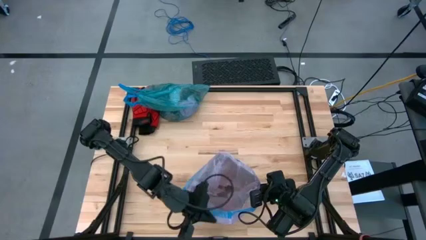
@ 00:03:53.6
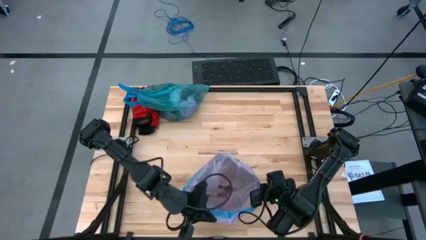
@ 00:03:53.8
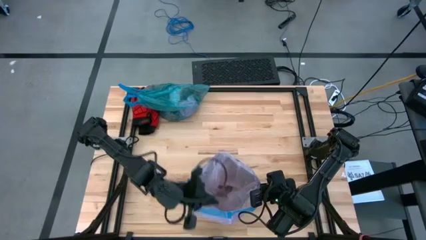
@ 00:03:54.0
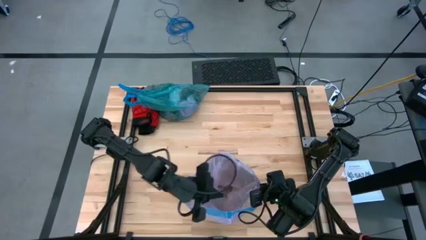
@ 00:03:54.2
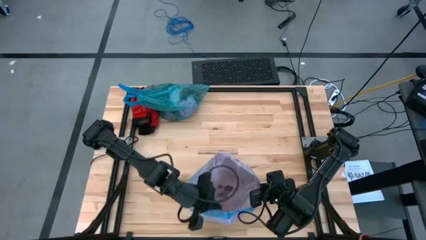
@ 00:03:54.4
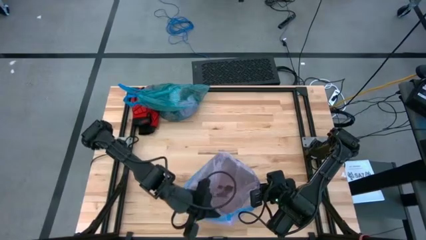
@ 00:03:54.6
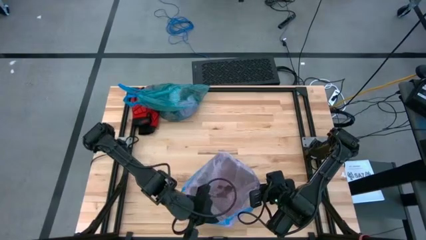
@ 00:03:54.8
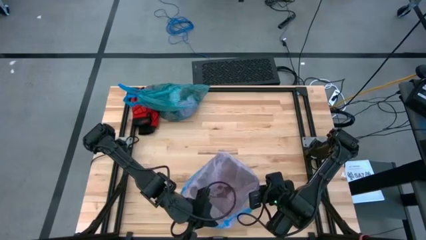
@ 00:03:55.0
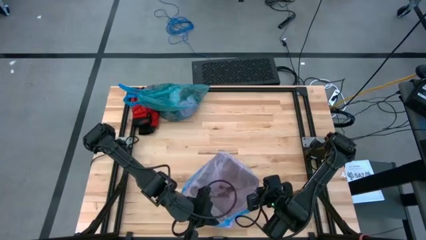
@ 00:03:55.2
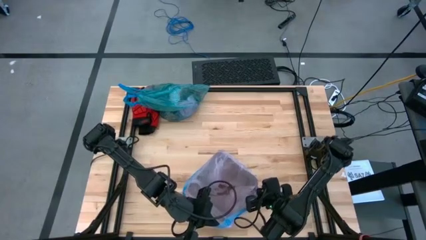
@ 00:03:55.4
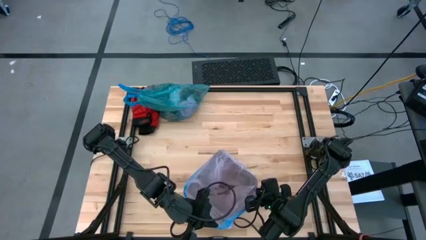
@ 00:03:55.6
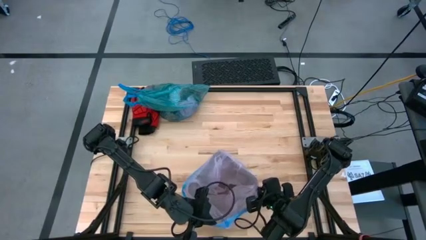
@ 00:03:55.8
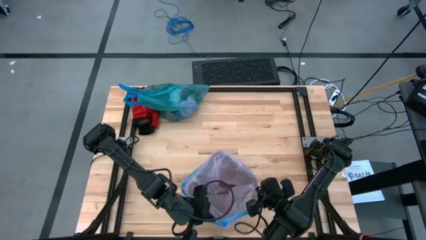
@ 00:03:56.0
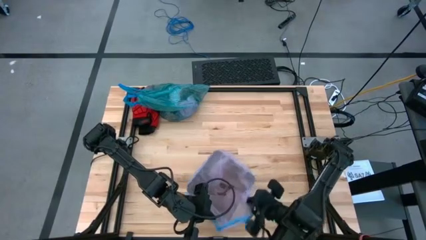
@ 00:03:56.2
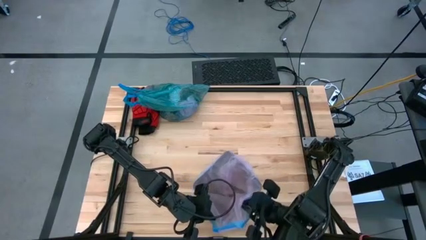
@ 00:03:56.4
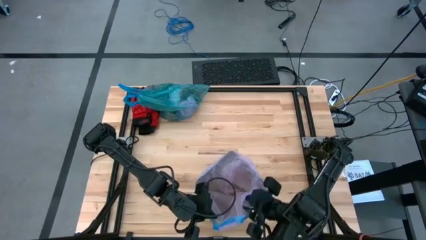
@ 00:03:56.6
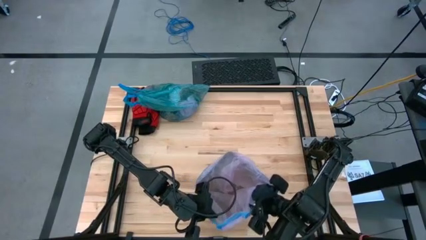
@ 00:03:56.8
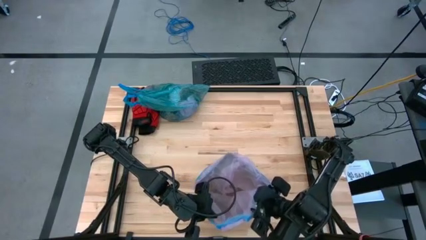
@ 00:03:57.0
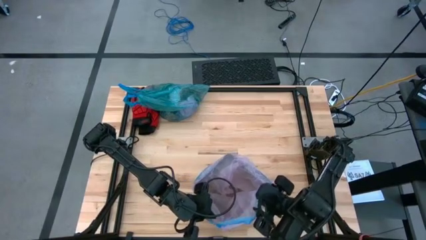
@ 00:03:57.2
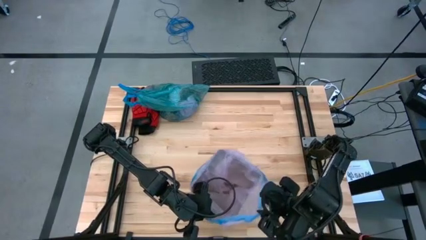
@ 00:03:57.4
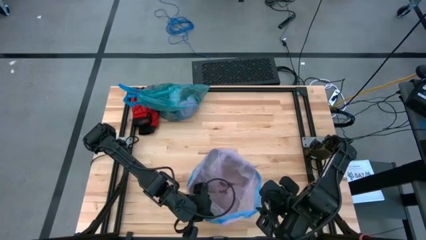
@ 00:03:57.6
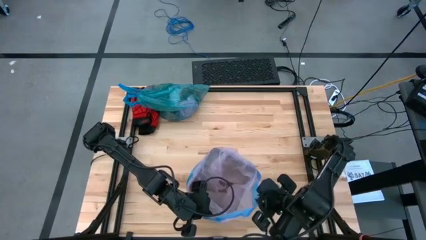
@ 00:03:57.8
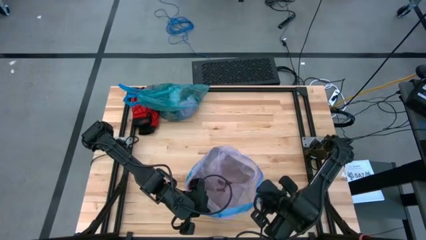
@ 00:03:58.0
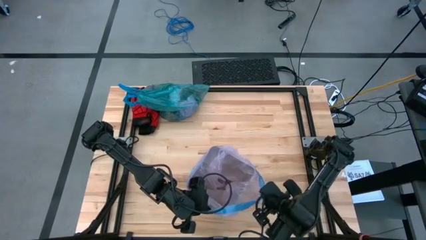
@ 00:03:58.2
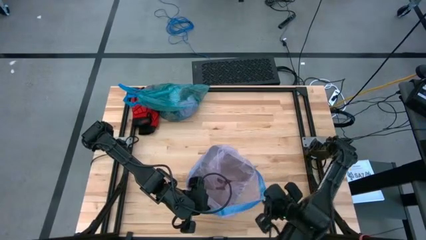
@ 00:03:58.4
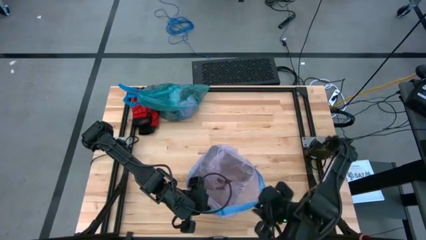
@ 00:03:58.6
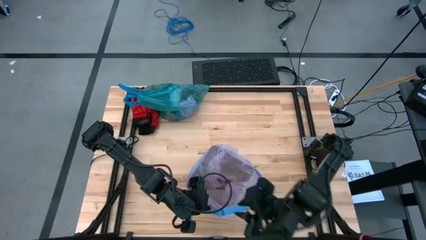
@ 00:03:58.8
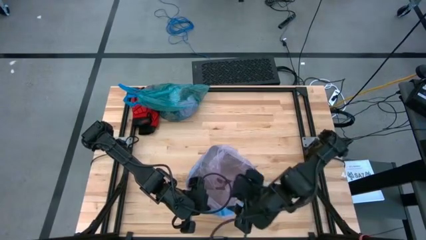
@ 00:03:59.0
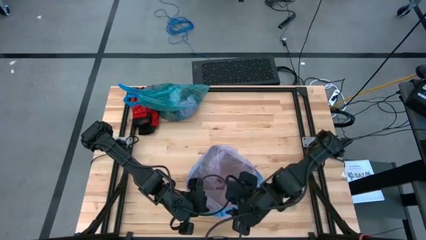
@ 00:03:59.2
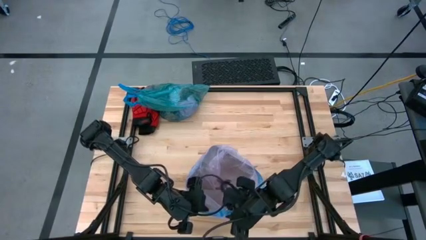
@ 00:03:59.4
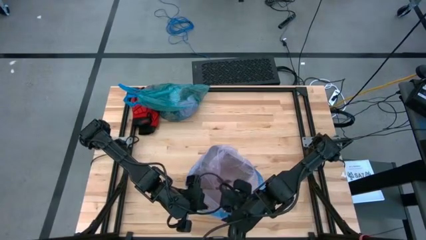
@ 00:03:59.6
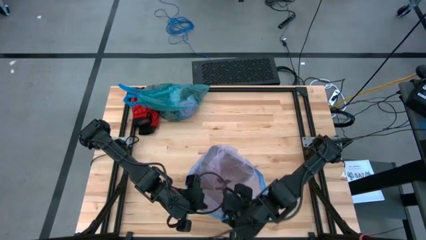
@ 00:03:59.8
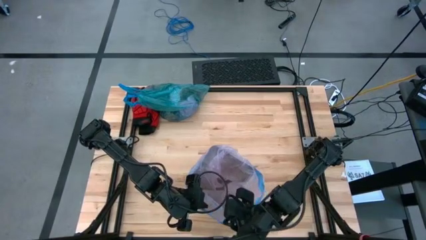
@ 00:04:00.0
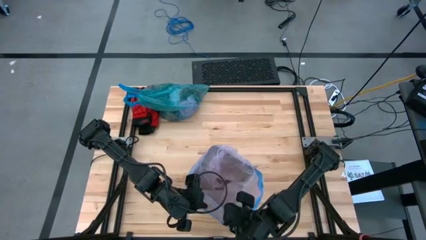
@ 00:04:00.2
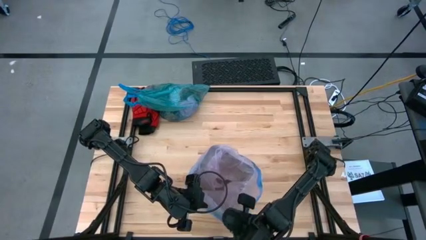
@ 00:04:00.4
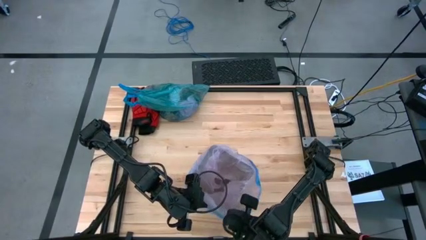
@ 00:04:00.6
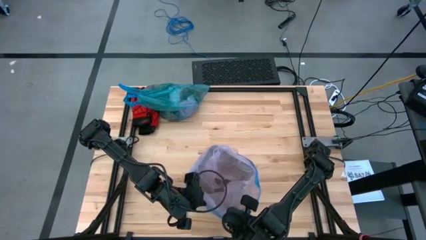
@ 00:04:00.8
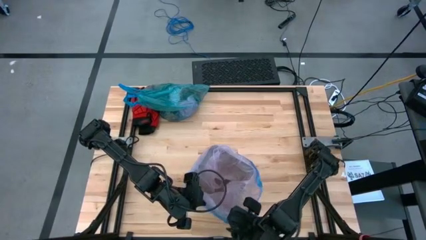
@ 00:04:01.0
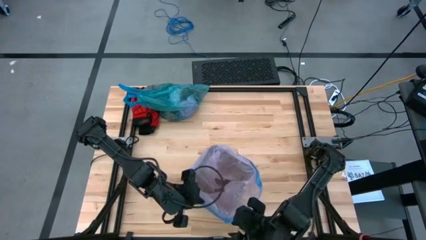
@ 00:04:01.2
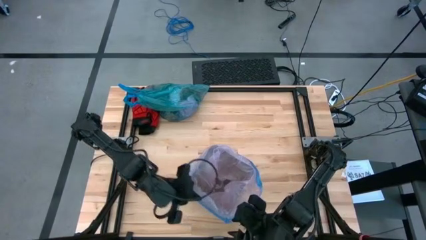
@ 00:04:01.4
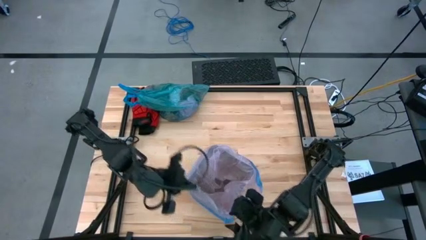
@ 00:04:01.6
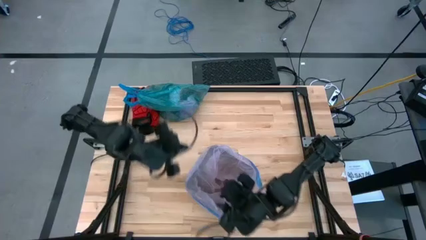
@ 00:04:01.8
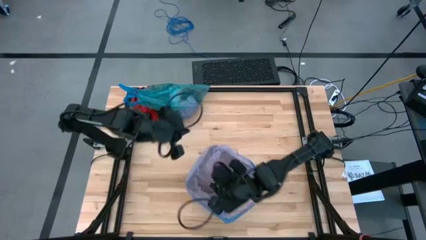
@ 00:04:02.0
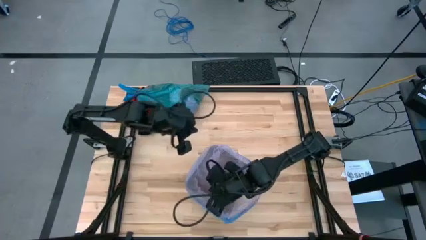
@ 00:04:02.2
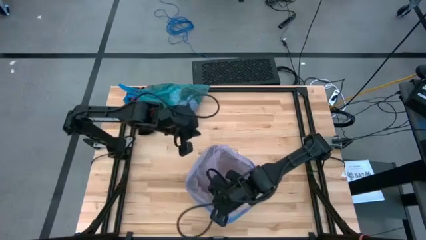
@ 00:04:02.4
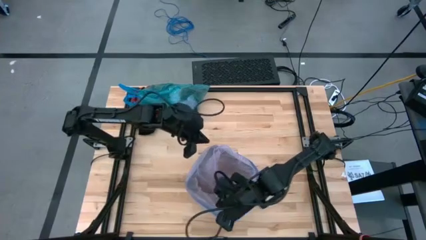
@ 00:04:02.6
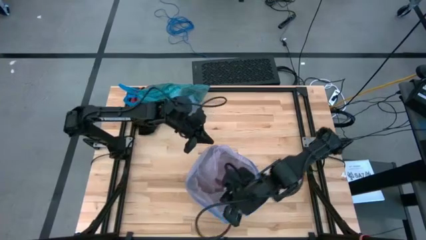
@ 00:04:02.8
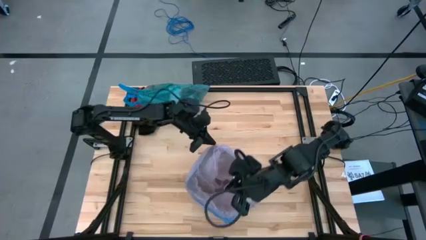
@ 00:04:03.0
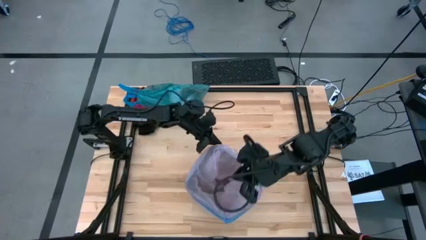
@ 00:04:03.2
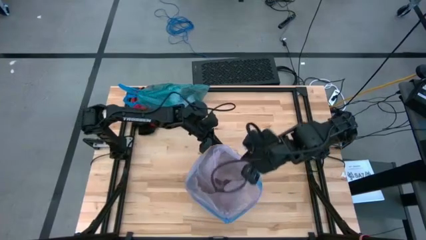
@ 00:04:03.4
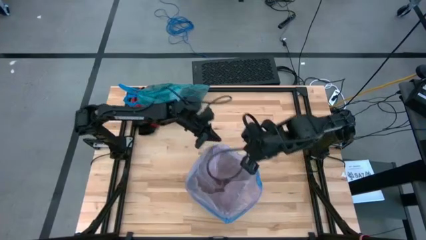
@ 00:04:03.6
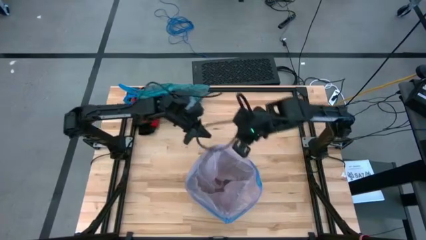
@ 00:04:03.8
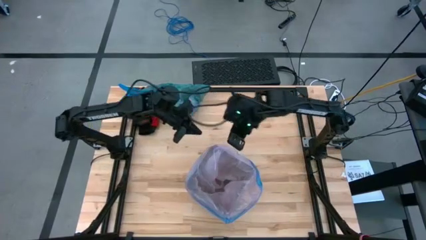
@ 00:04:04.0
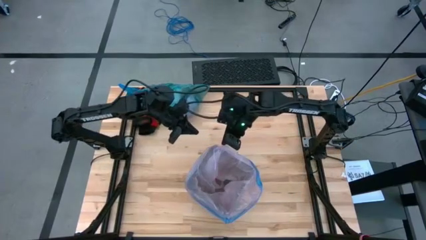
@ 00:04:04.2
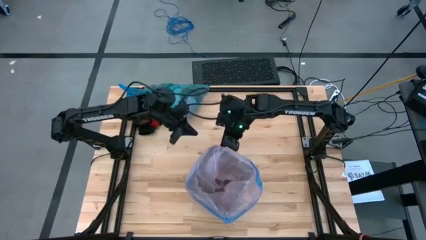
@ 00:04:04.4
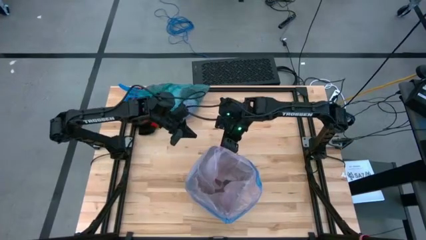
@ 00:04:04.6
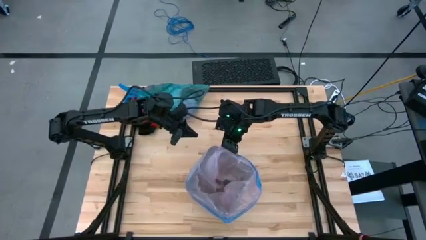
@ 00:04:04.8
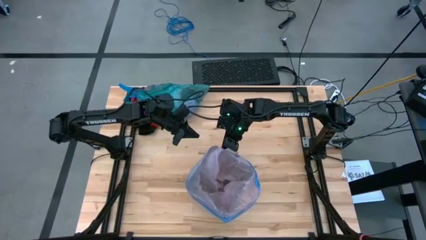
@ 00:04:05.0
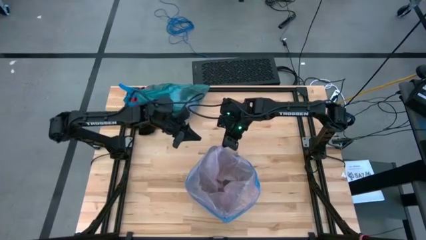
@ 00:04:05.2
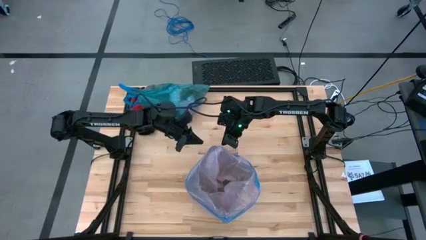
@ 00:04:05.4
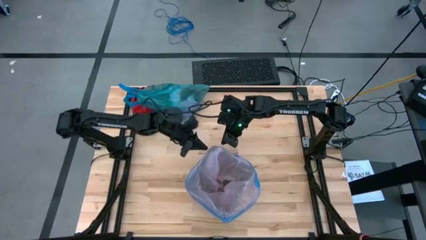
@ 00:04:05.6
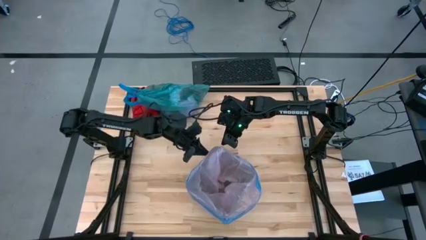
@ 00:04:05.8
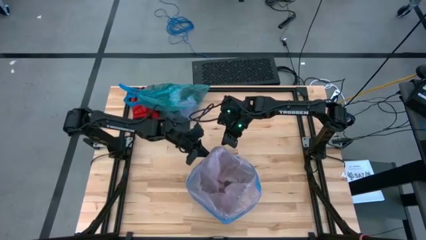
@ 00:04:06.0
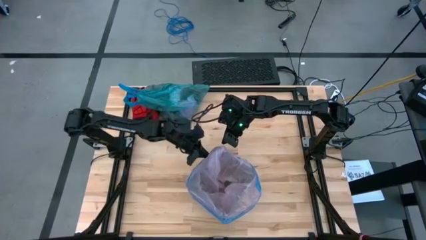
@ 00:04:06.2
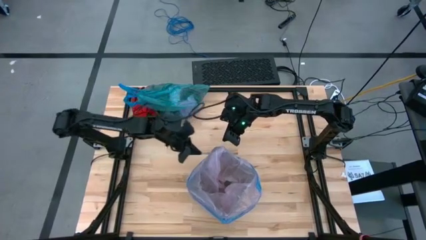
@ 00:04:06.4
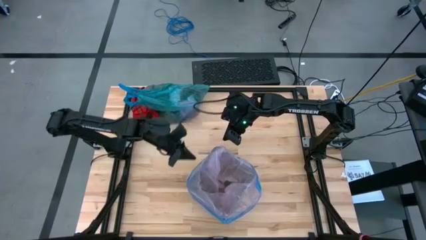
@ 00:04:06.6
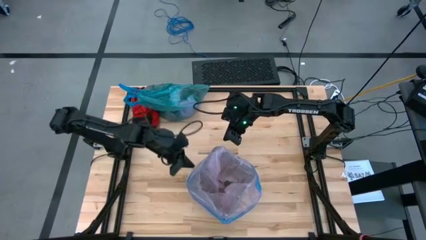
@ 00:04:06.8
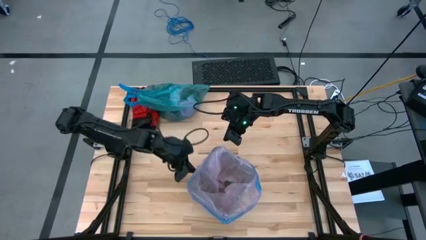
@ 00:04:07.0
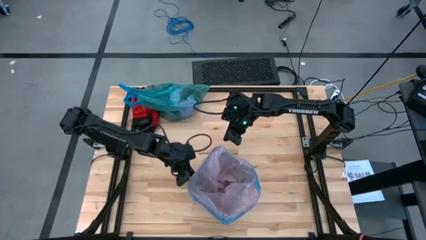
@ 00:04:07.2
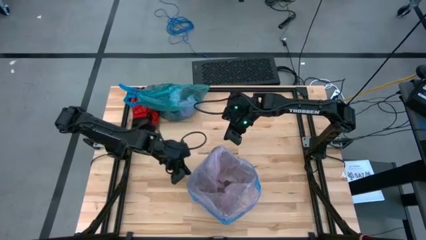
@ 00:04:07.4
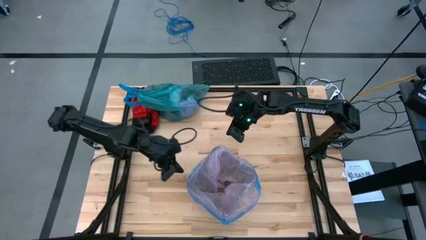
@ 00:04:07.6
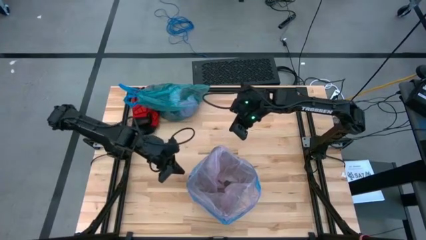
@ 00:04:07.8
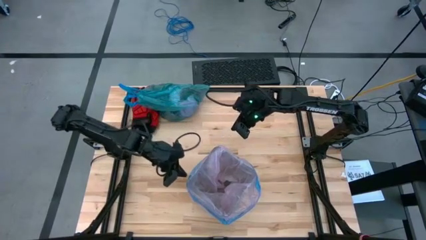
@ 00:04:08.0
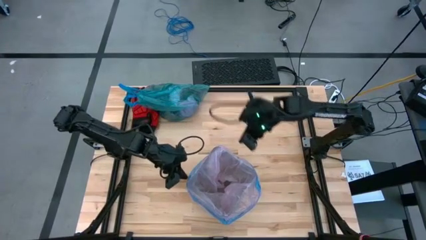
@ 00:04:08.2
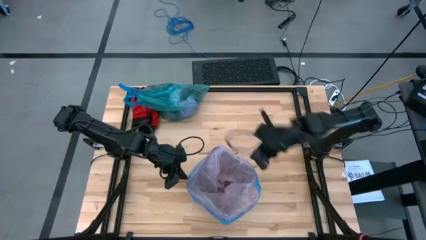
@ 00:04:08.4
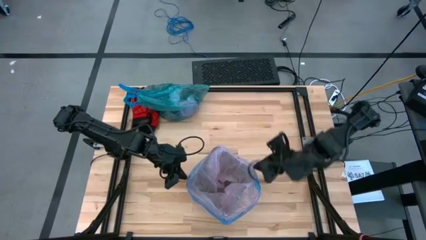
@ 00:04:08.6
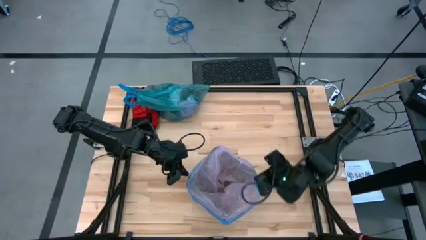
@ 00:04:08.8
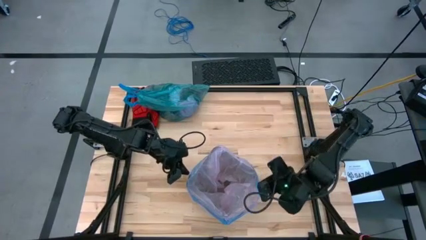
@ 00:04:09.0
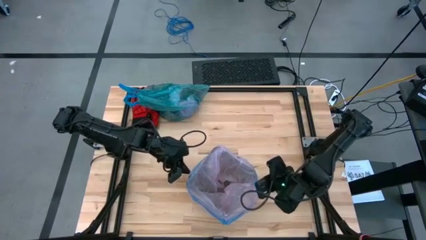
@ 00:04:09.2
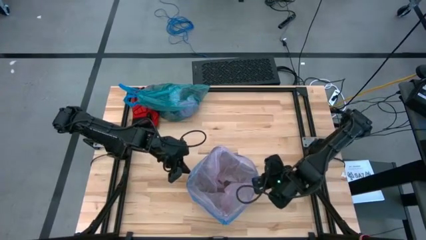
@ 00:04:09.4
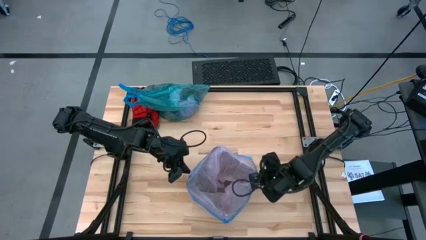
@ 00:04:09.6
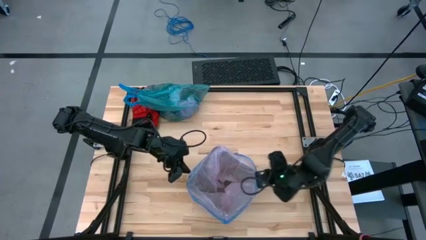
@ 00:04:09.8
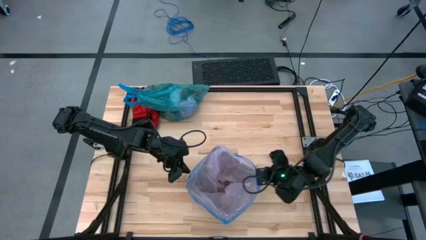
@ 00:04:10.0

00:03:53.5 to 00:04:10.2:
Task: place trash/remove bag and relplace
Insert the new pink trash bag into the black trash bin
